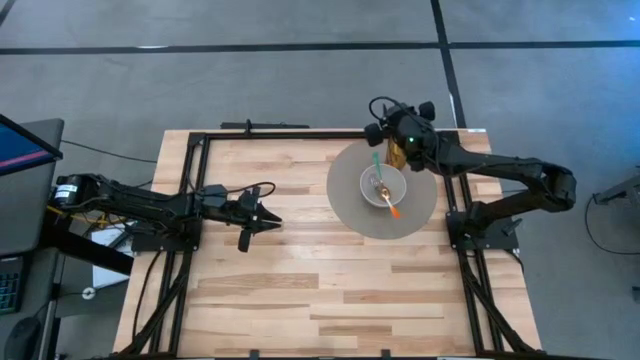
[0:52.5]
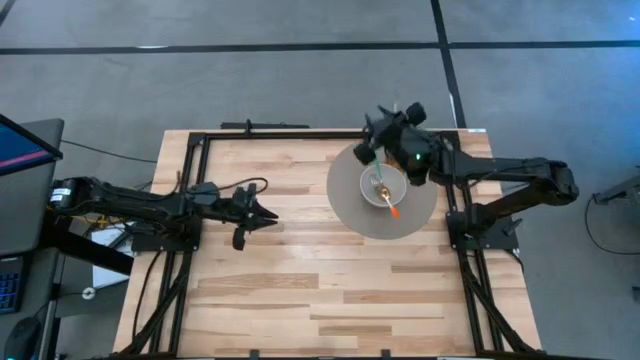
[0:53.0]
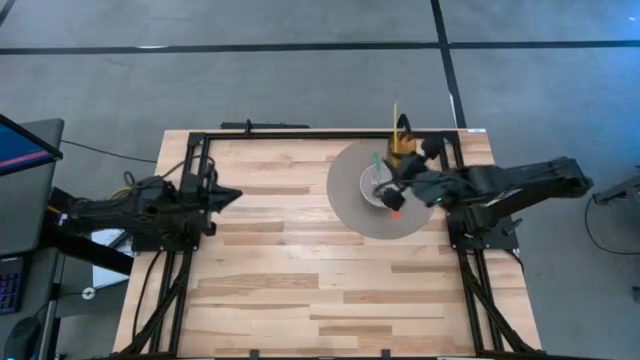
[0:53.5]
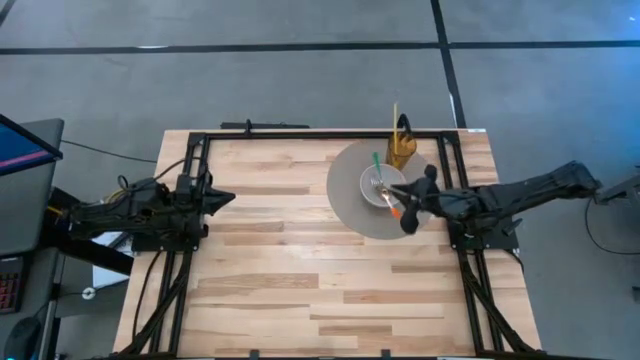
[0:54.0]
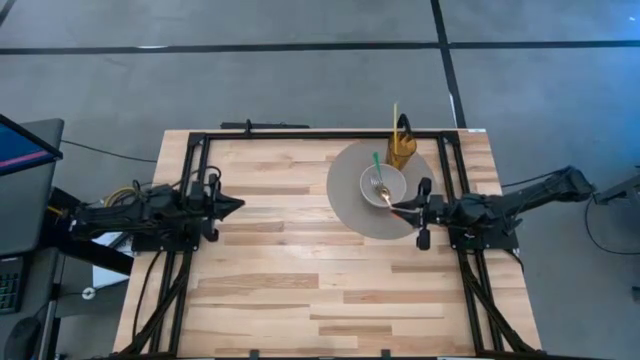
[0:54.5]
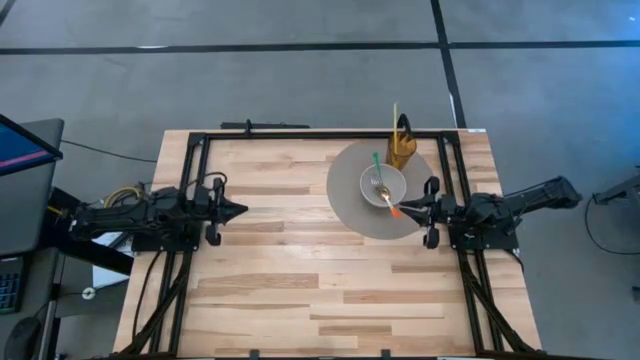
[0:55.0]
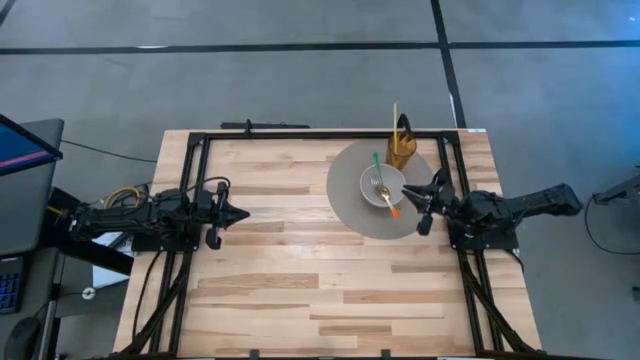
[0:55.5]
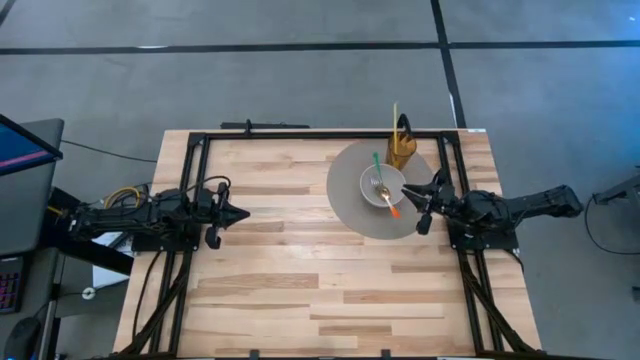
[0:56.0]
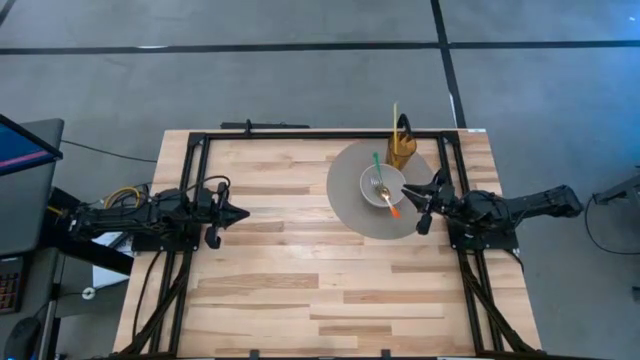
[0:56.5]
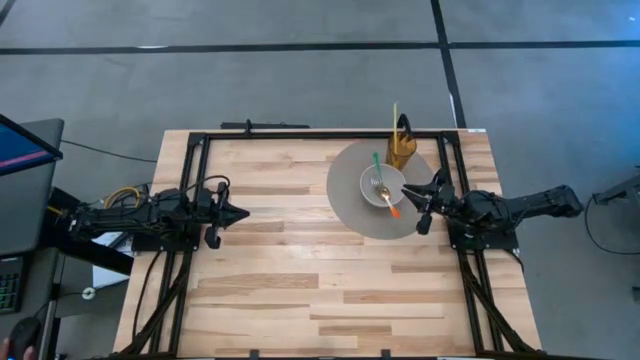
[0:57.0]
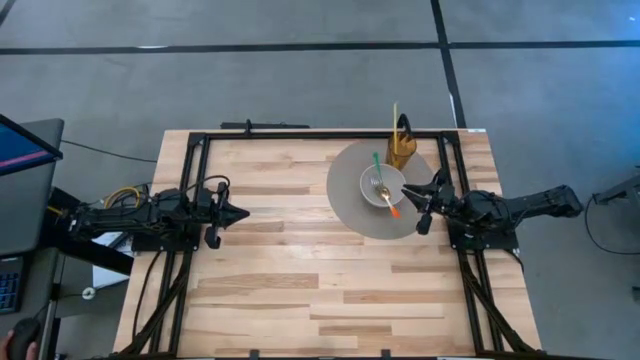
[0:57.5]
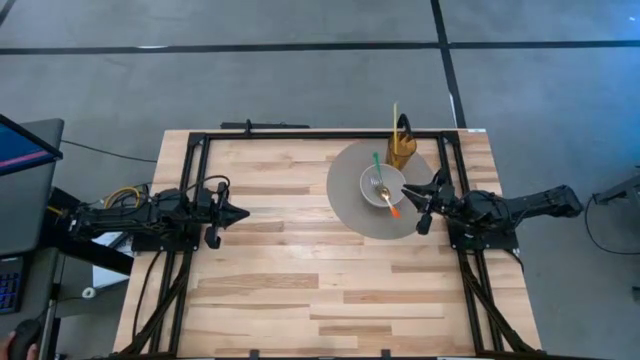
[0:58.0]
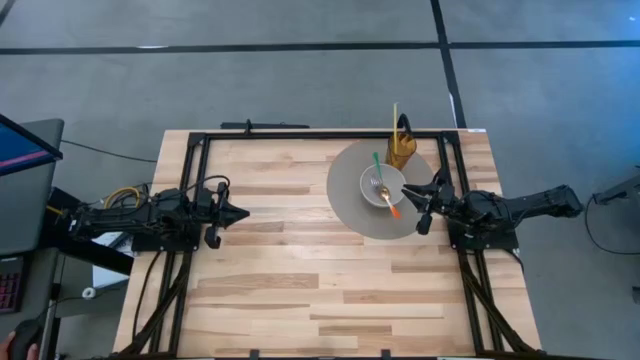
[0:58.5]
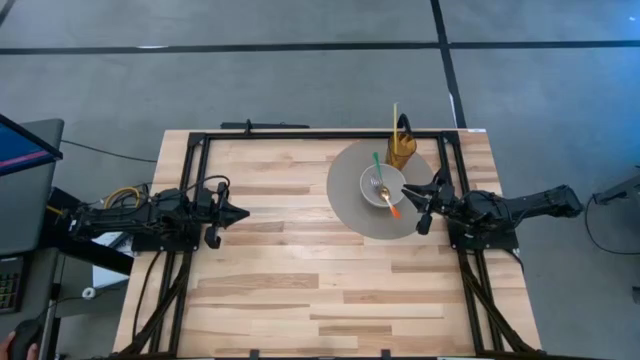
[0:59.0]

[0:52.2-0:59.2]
Task: Pick & Place Utensil
Return to Home Position

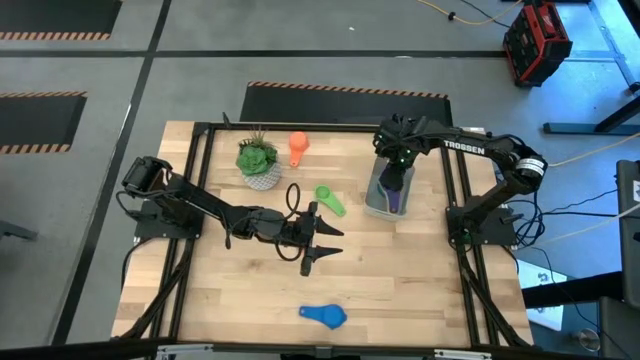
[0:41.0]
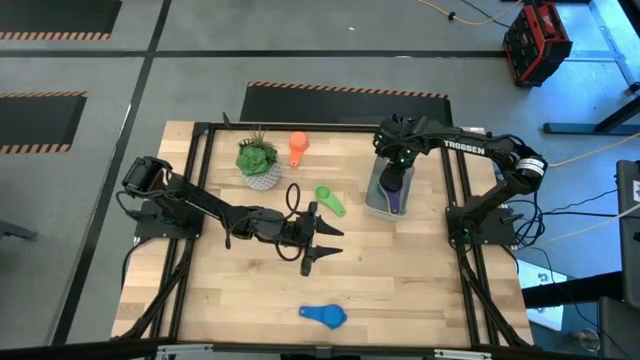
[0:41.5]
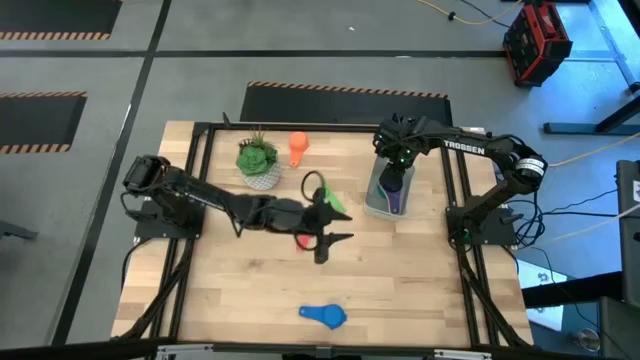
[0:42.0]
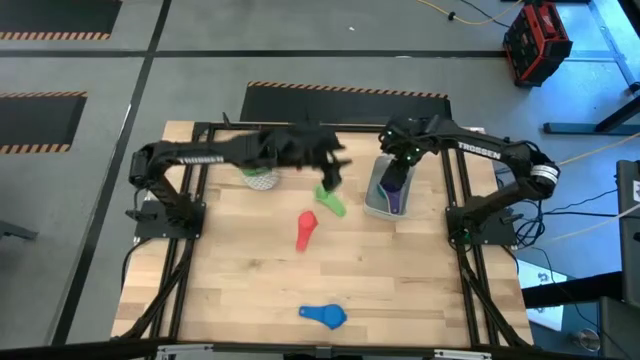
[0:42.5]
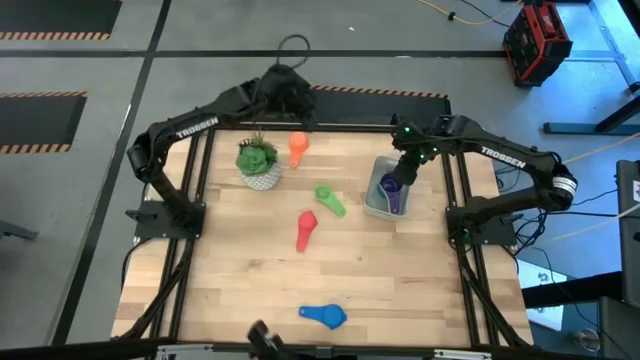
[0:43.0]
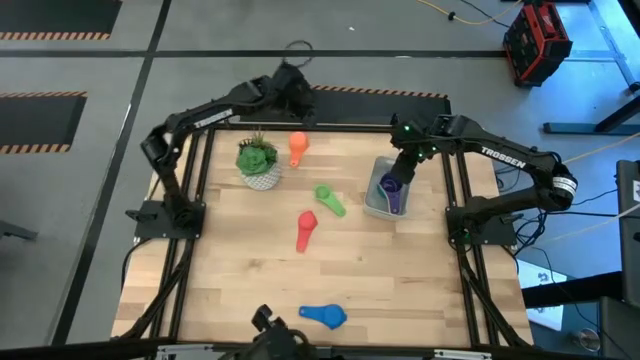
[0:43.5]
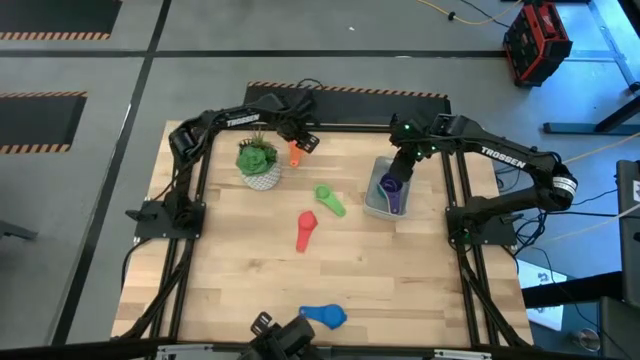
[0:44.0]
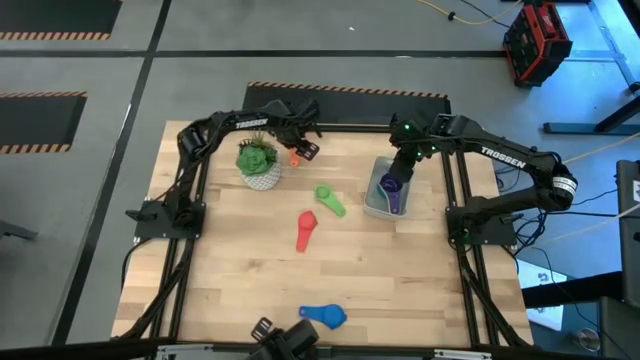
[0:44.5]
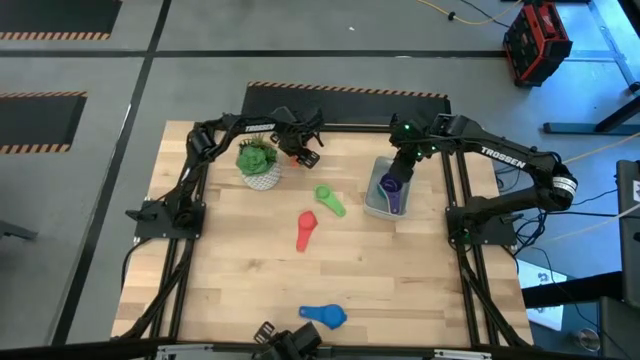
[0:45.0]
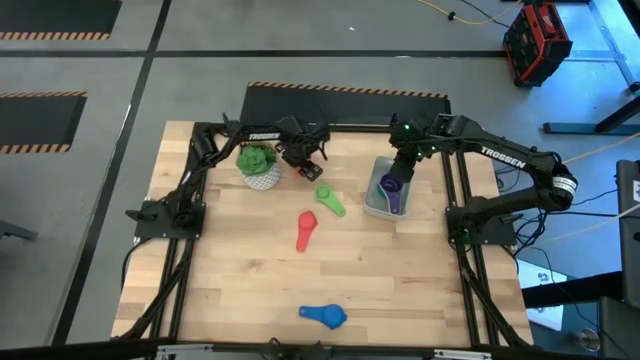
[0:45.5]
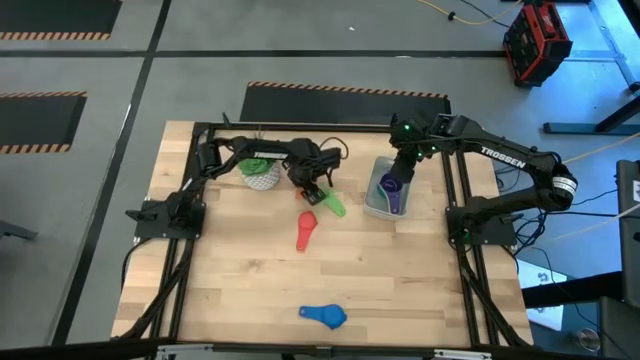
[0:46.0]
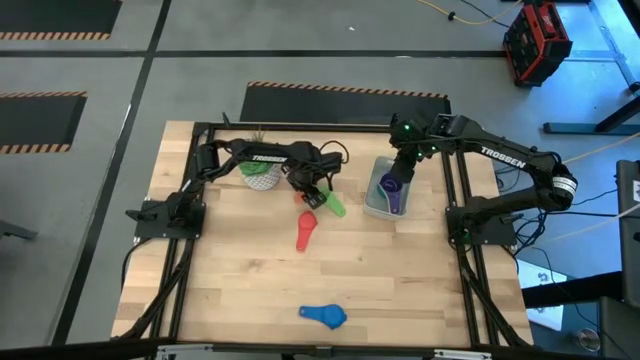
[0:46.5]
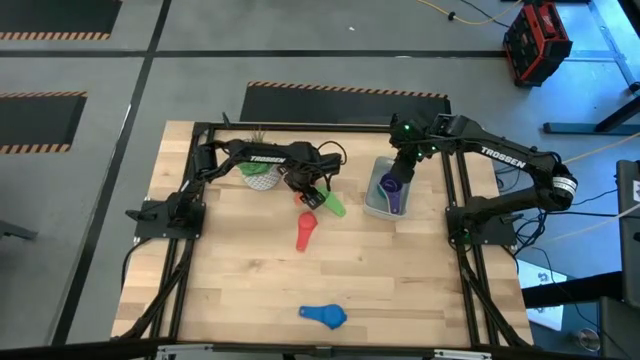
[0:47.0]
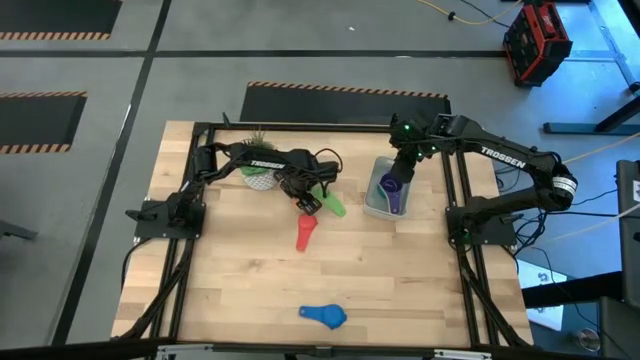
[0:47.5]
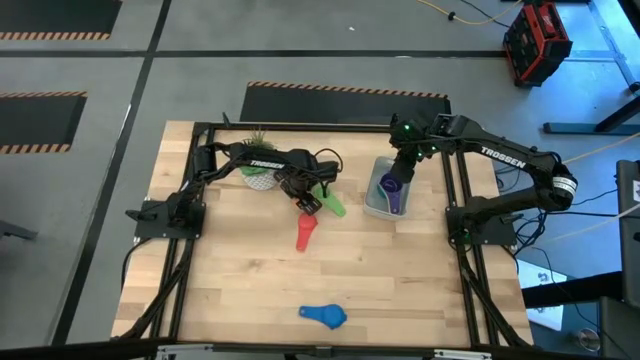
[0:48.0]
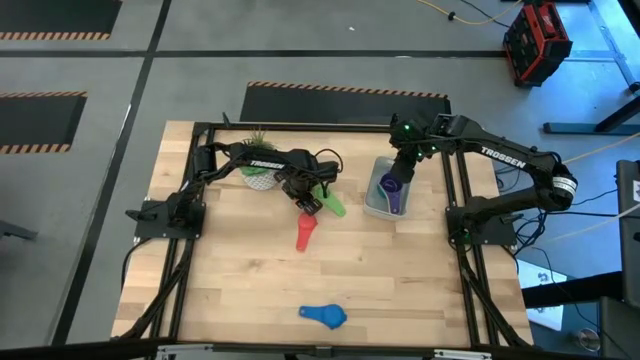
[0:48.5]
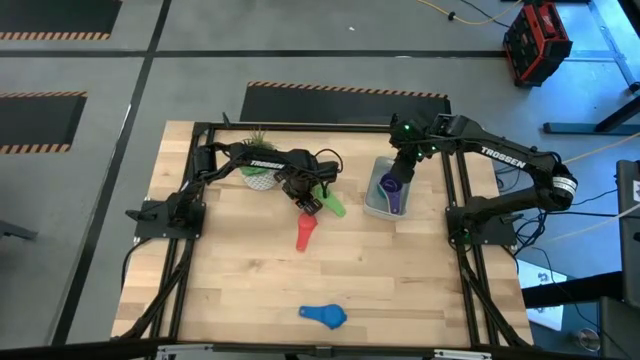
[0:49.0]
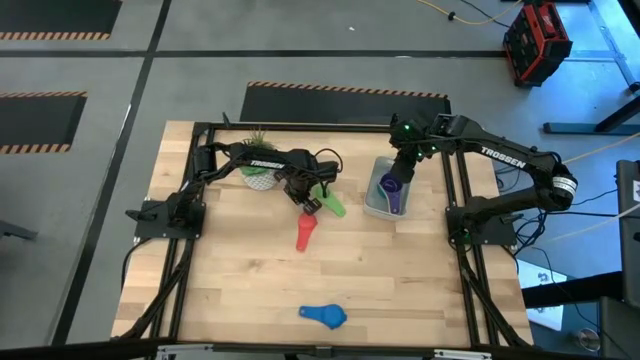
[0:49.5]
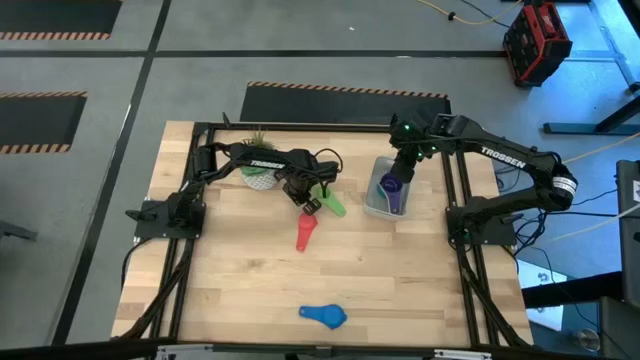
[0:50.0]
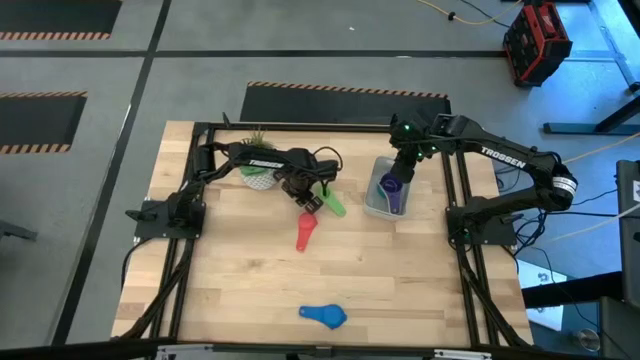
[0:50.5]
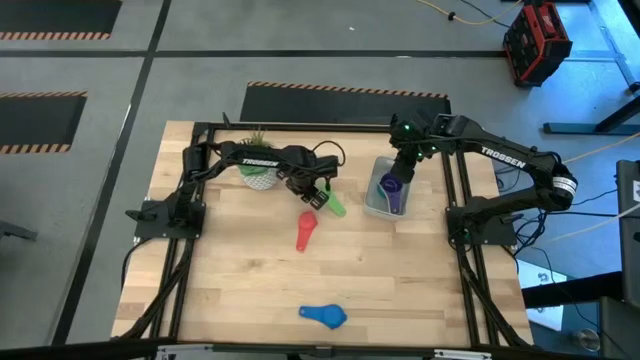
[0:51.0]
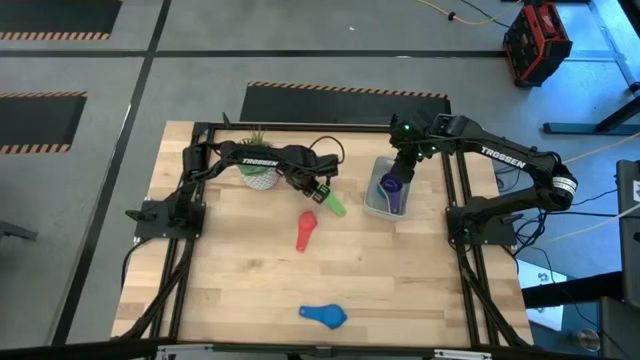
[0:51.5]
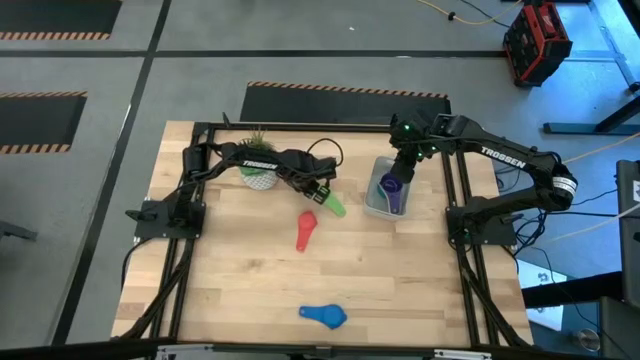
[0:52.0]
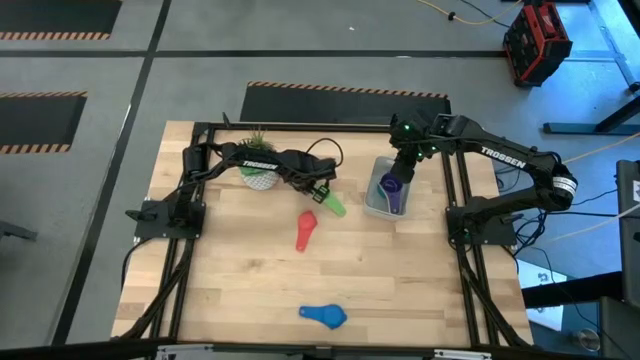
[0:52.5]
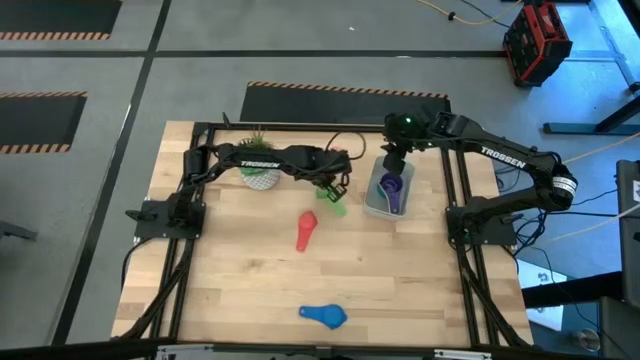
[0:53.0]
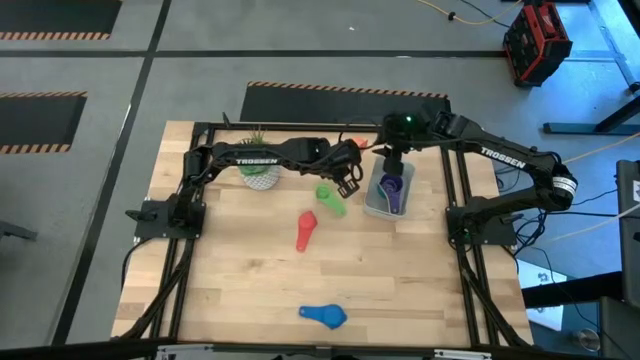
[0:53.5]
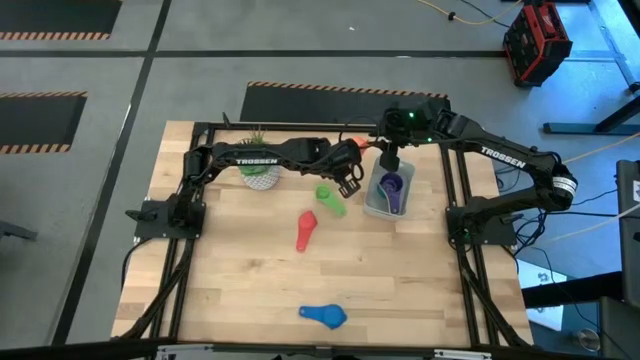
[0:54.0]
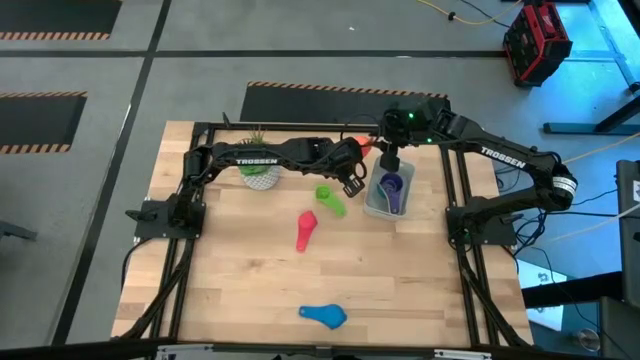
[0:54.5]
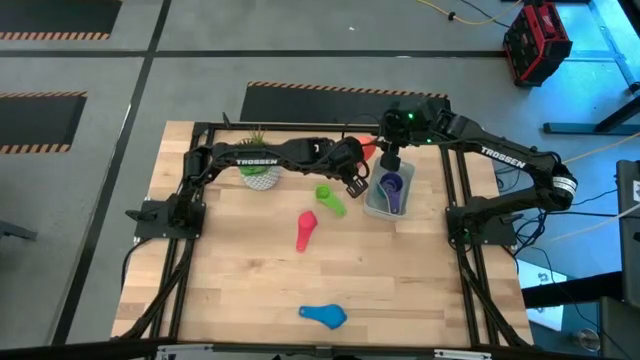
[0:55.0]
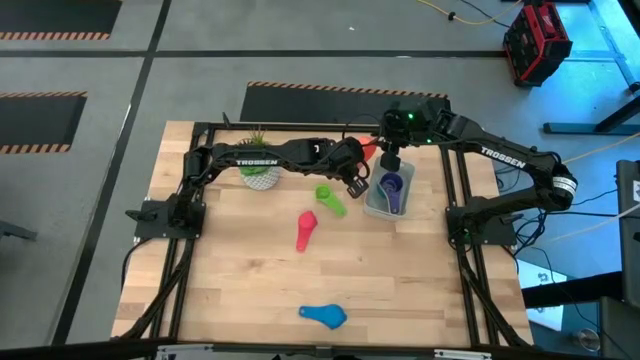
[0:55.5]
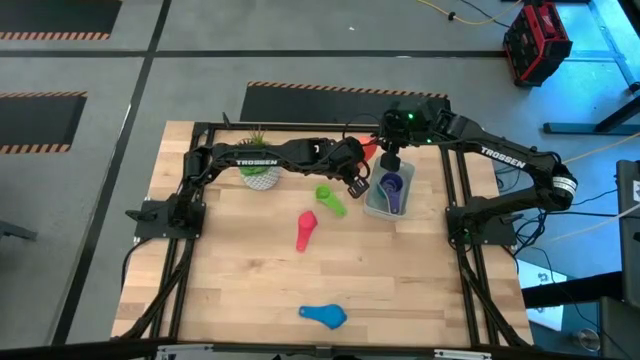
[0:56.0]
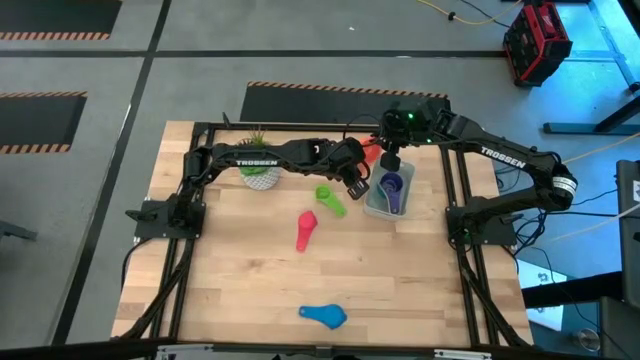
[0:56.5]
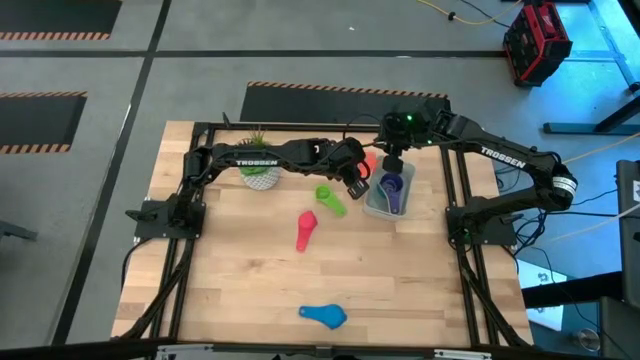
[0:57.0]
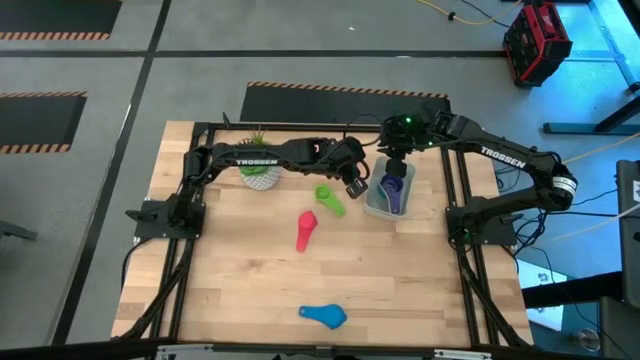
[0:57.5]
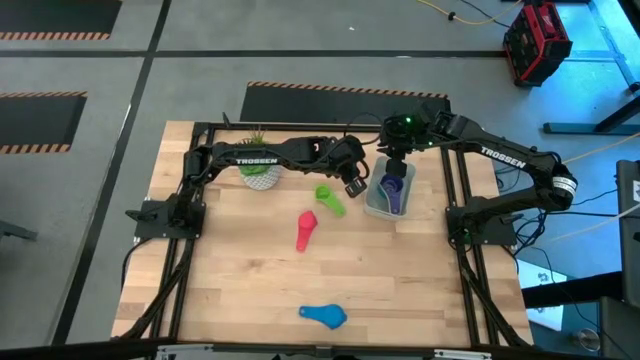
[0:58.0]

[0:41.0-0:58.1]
Task: Nest measuring cups in basket
Stack the orange measuring cup on top of the violet measuring cup in the gray bin
